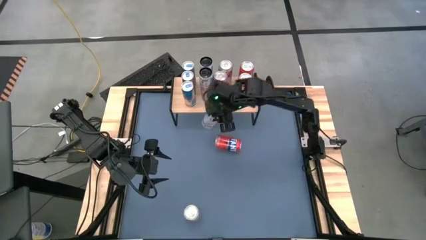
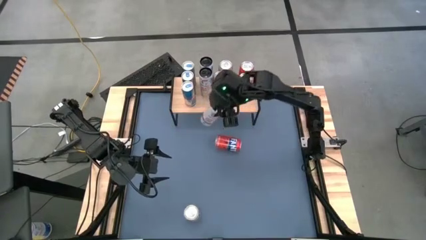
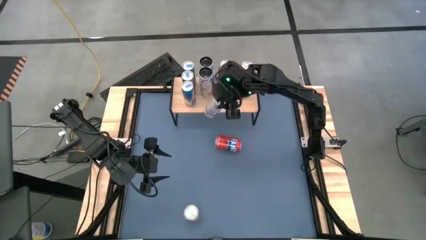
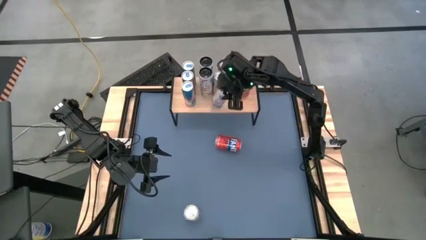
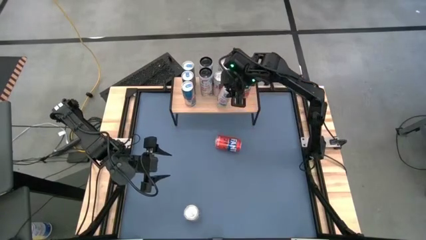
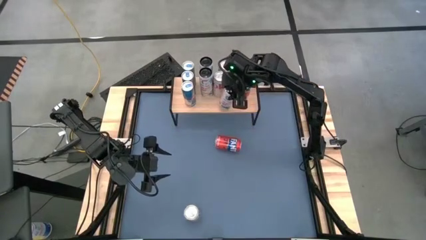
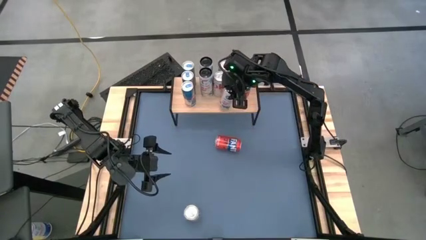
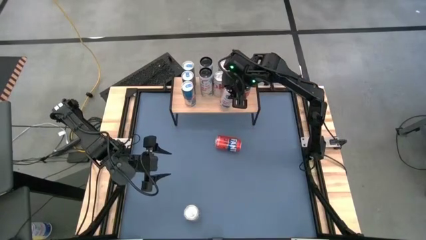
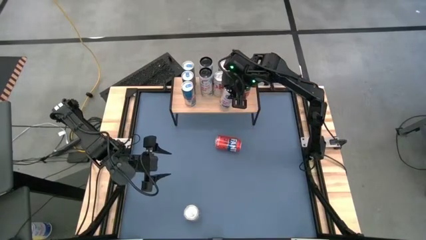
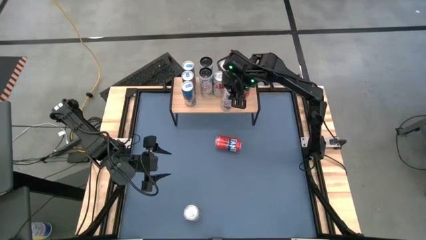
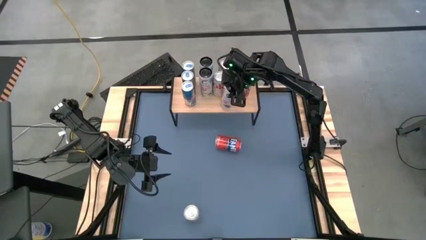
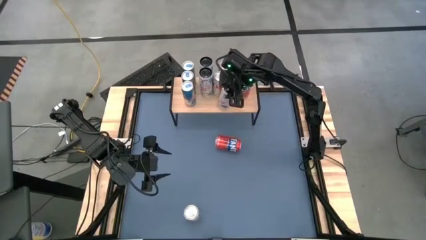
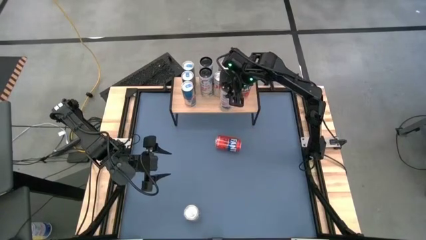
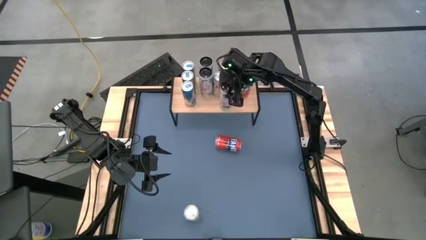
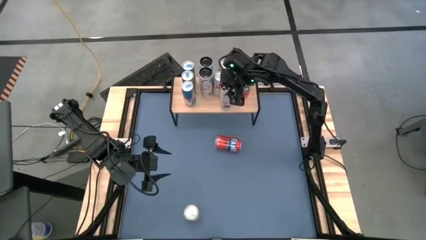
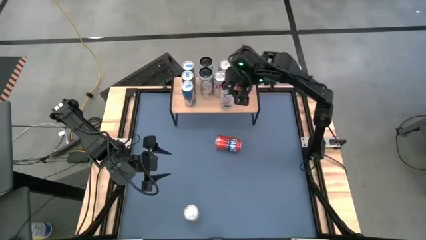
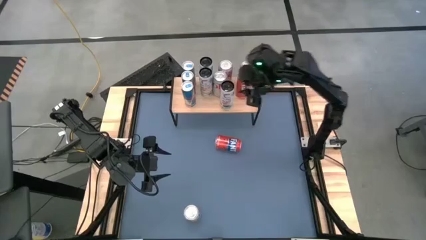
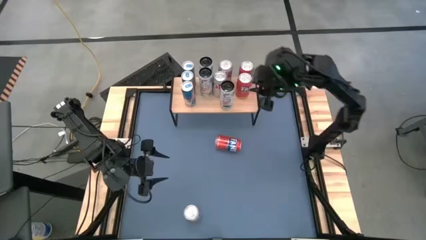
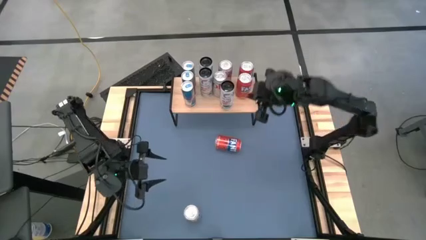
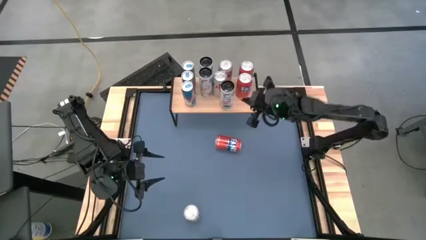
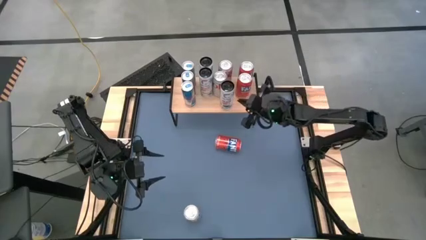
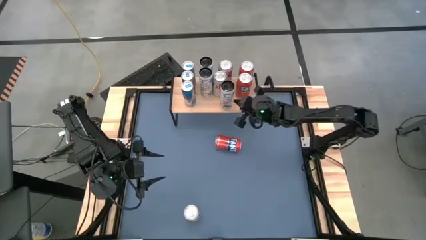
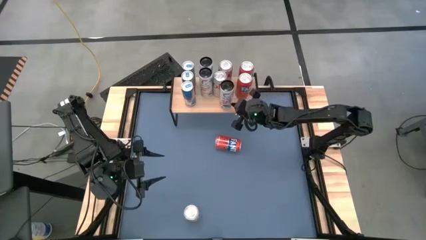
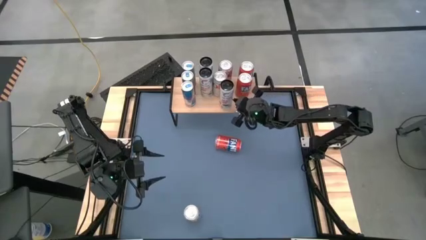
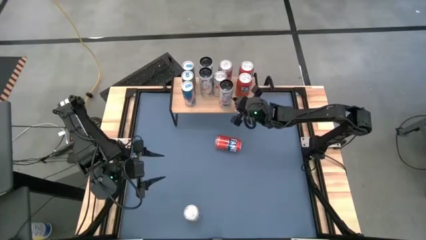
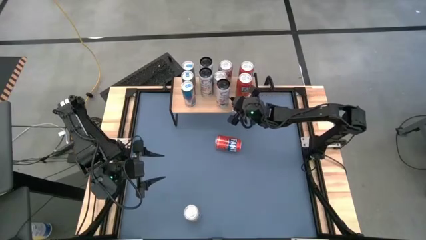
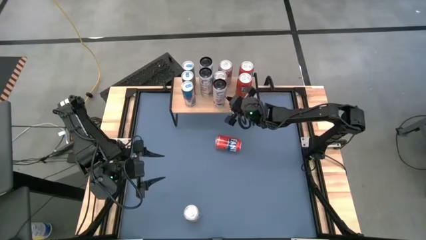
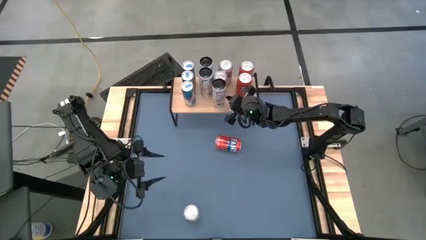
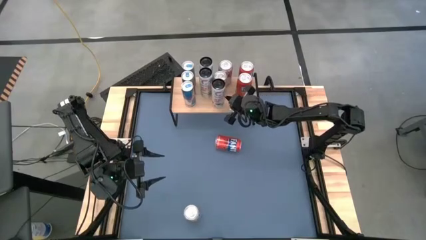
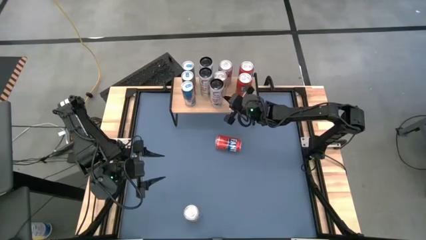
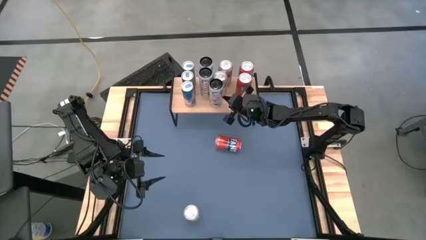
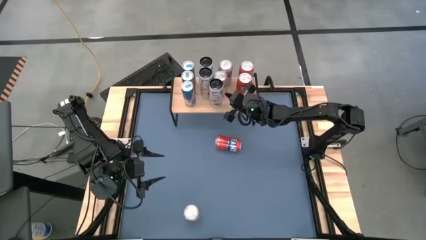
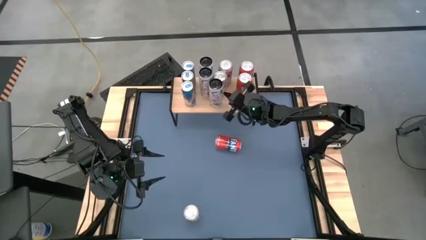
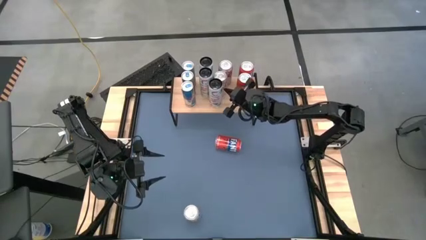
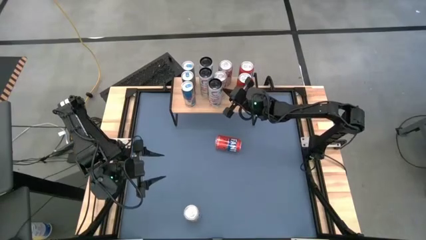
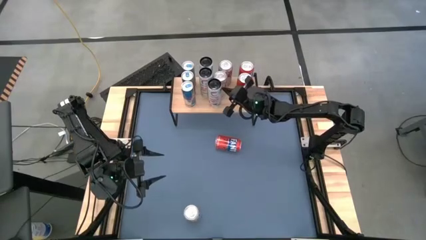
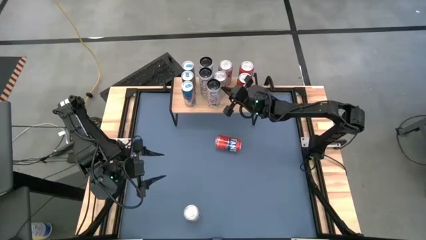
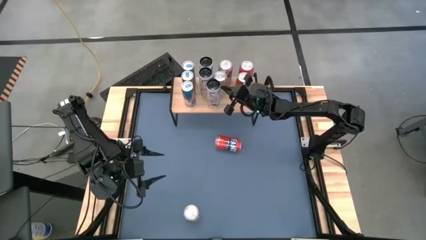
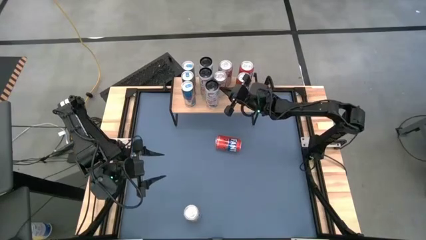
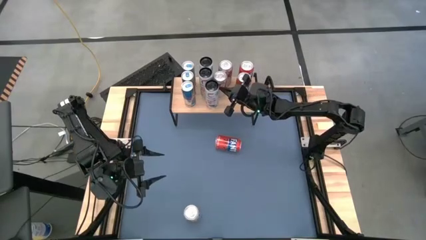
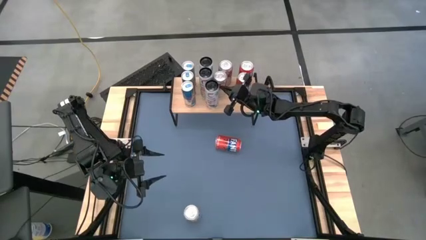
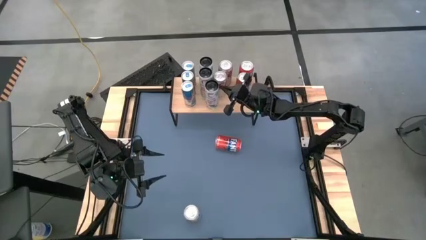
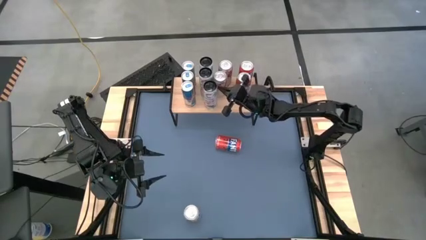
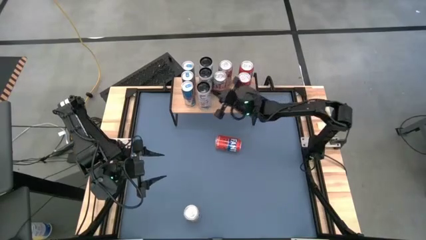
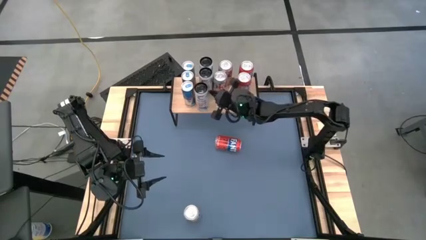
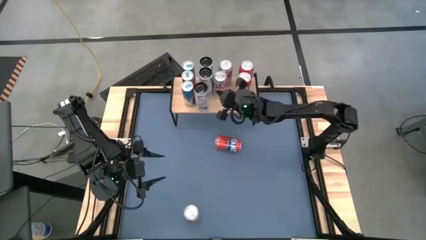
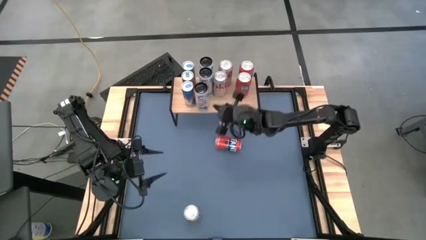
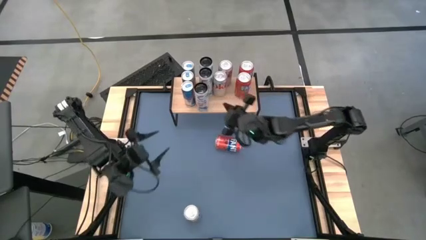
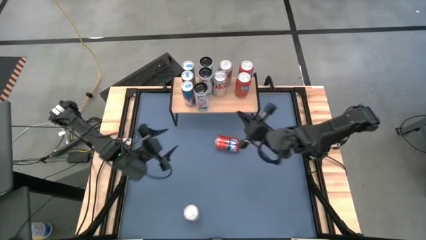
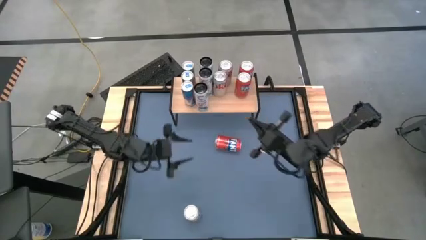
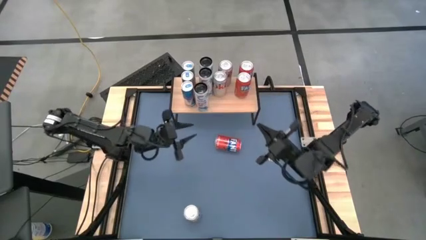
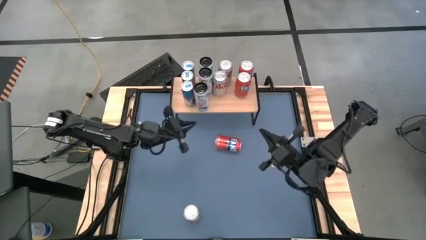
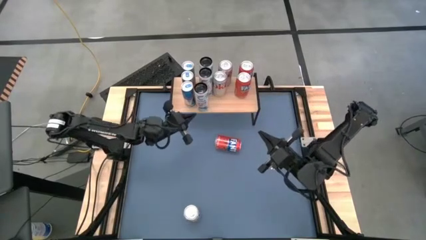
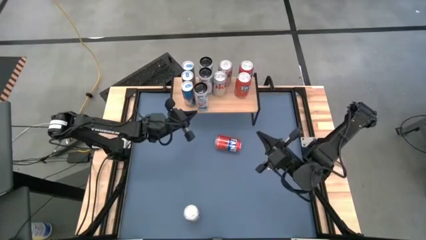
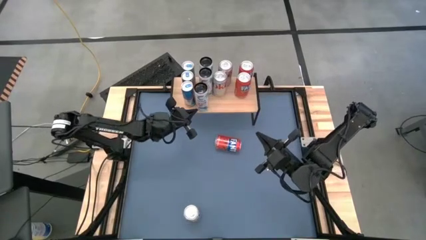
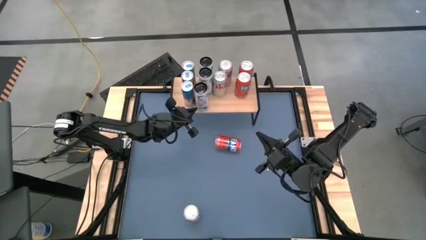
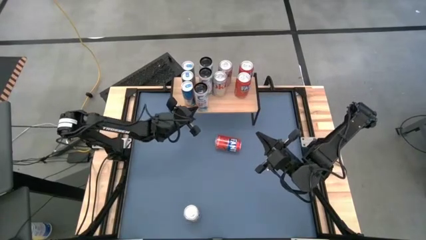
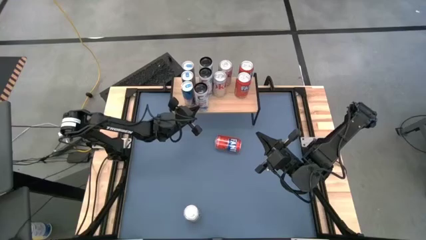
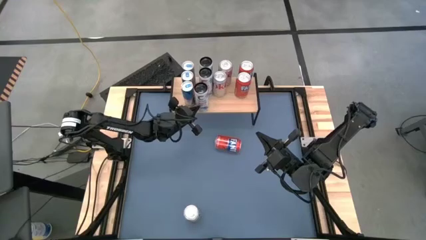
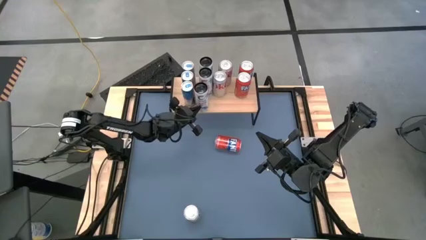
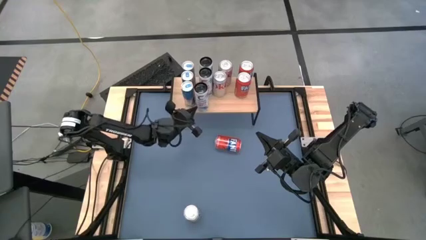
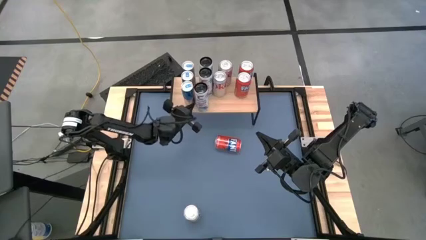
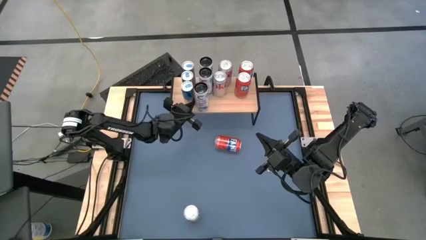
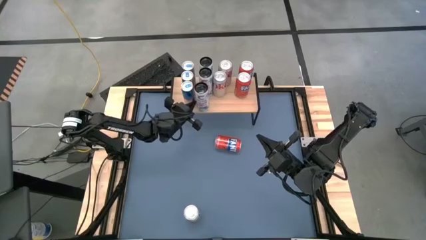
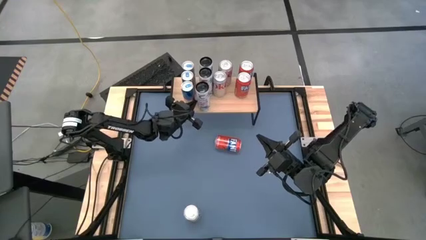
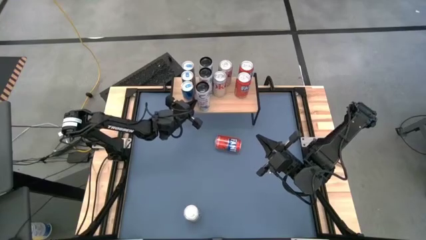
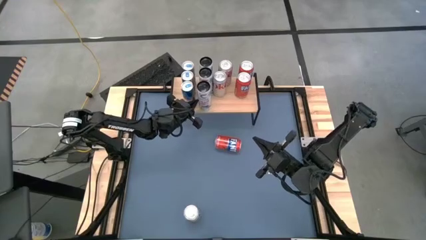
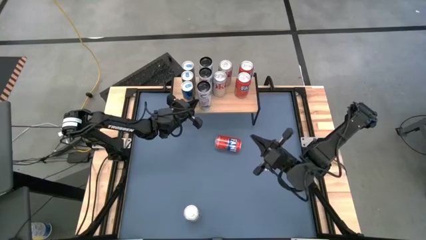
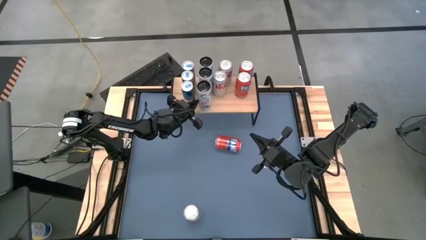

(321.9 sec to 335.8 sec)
Task: Place canned beverage on shelf
Put the pink soda can on the shelf aligned with the other pink soda can
